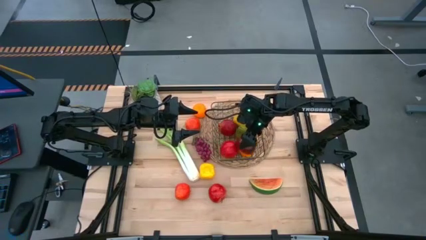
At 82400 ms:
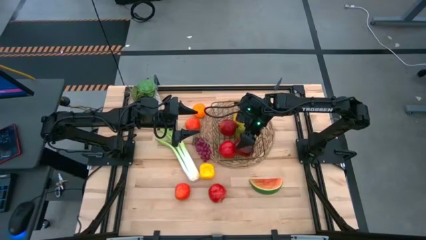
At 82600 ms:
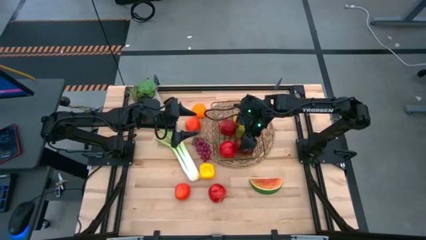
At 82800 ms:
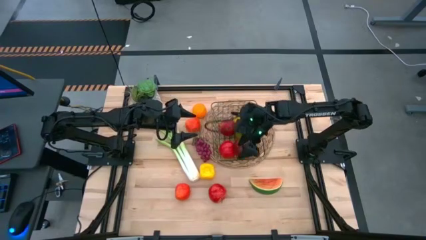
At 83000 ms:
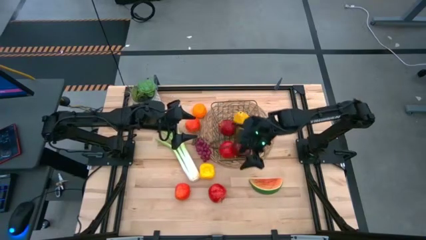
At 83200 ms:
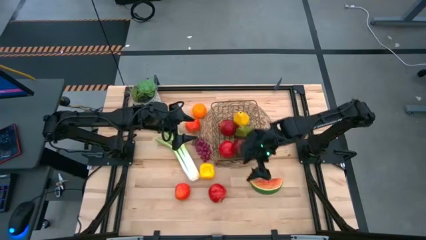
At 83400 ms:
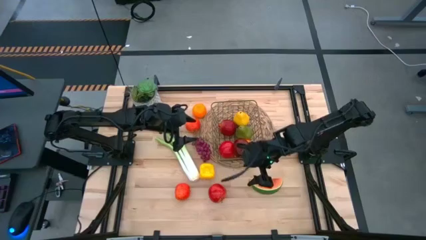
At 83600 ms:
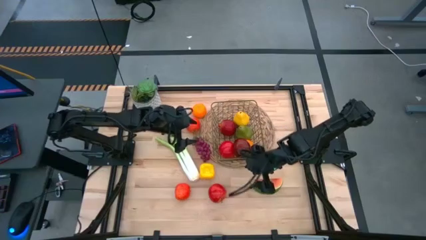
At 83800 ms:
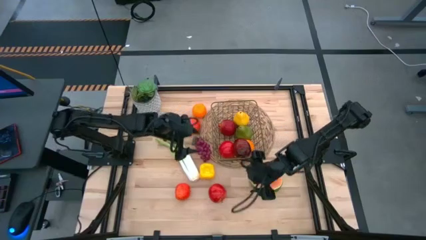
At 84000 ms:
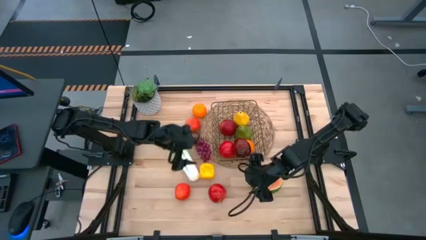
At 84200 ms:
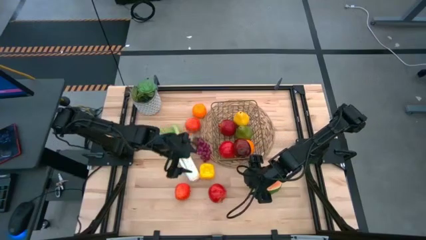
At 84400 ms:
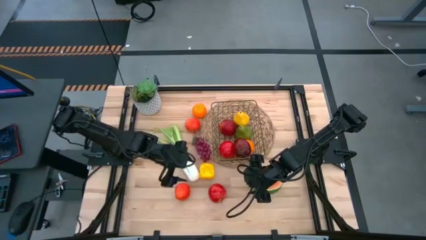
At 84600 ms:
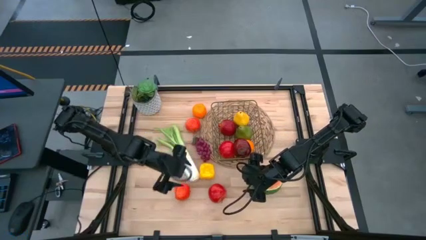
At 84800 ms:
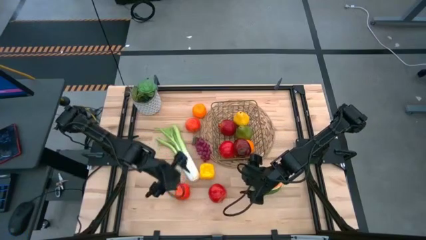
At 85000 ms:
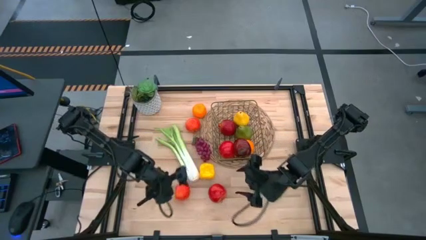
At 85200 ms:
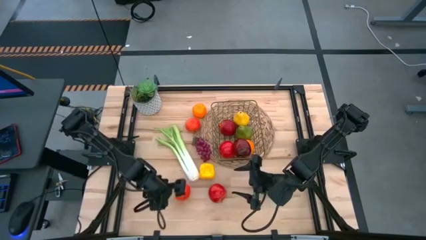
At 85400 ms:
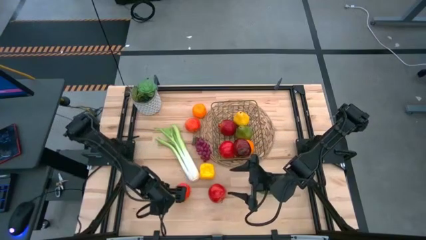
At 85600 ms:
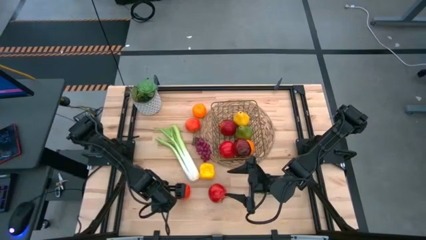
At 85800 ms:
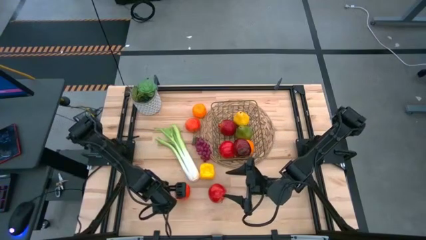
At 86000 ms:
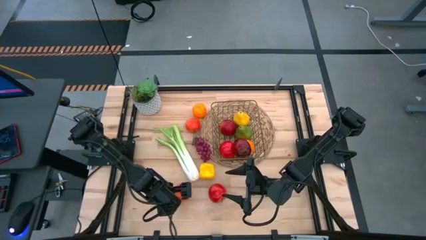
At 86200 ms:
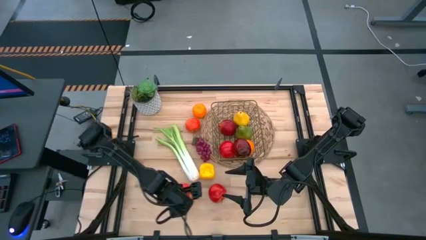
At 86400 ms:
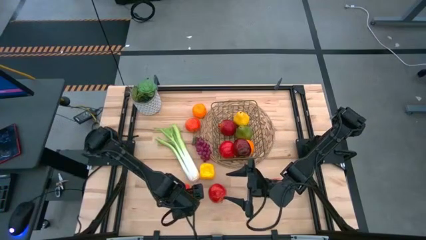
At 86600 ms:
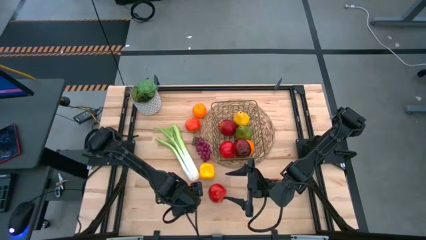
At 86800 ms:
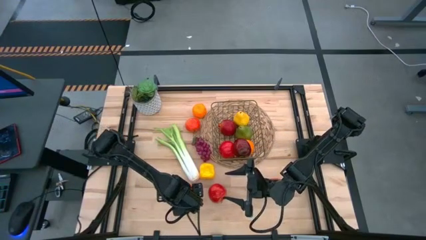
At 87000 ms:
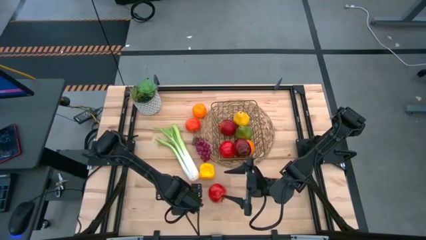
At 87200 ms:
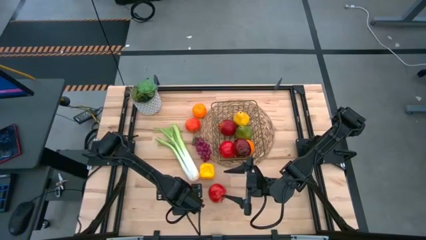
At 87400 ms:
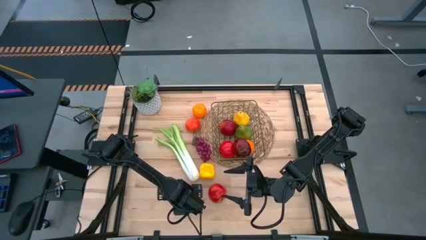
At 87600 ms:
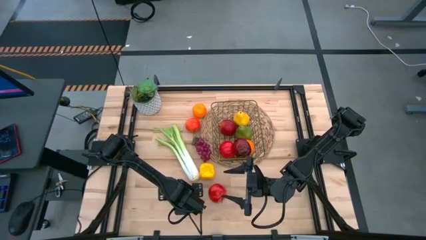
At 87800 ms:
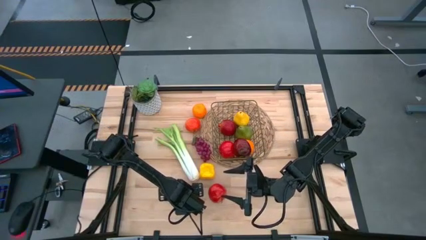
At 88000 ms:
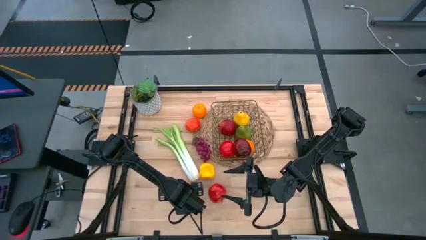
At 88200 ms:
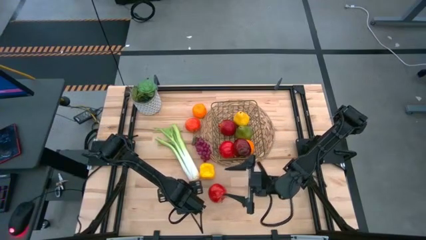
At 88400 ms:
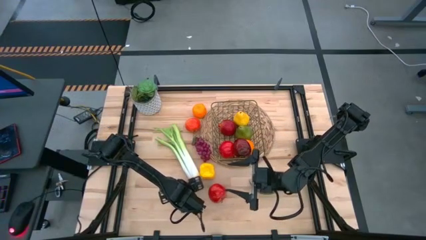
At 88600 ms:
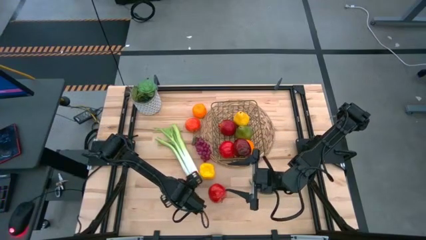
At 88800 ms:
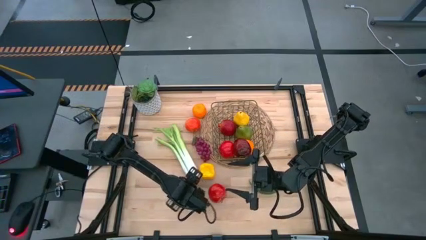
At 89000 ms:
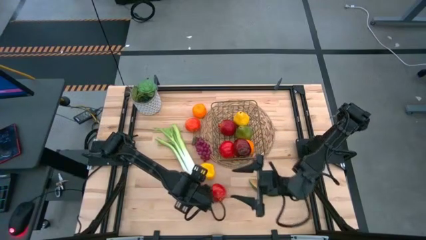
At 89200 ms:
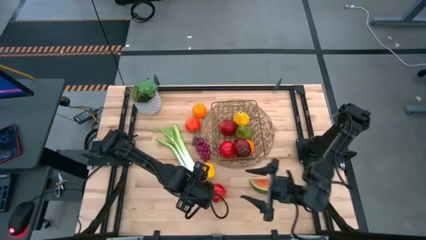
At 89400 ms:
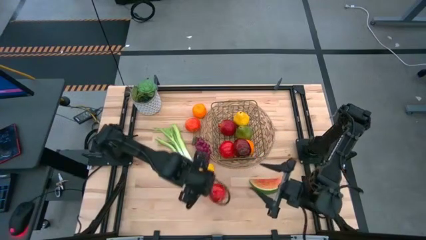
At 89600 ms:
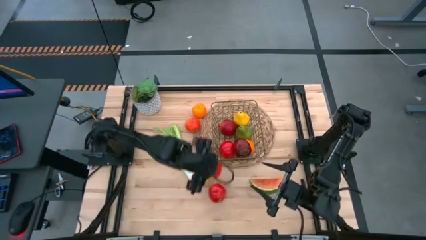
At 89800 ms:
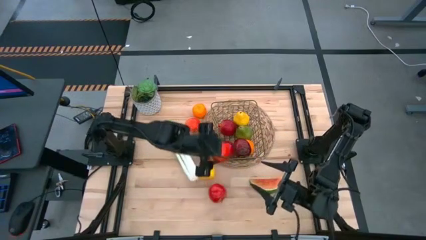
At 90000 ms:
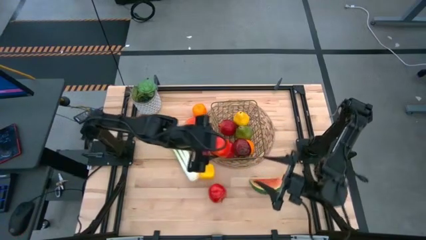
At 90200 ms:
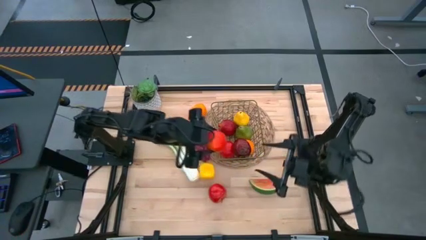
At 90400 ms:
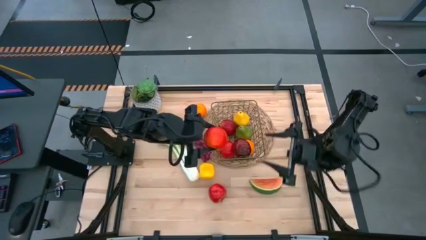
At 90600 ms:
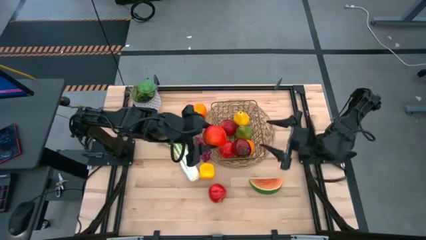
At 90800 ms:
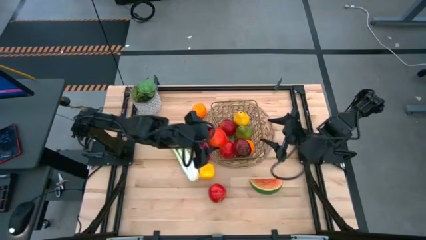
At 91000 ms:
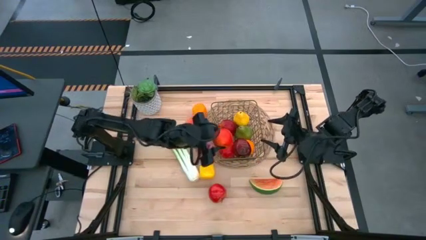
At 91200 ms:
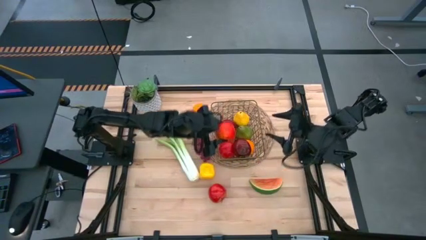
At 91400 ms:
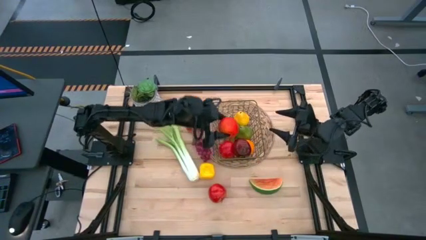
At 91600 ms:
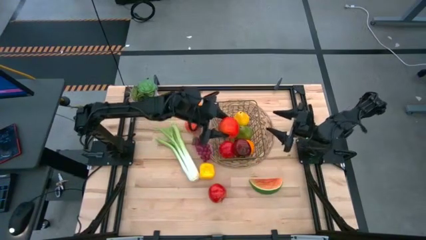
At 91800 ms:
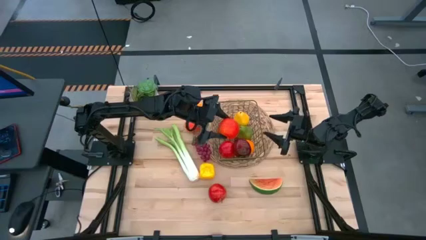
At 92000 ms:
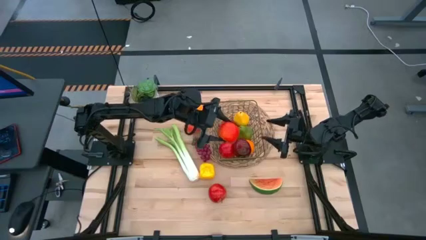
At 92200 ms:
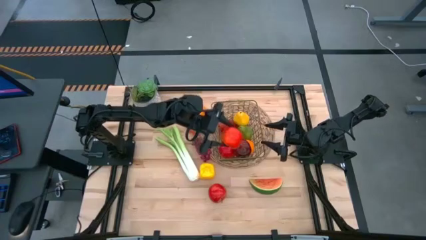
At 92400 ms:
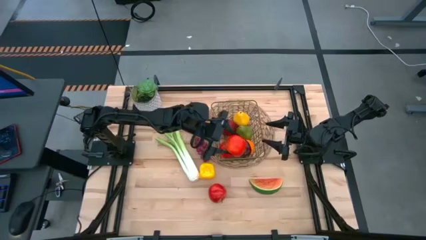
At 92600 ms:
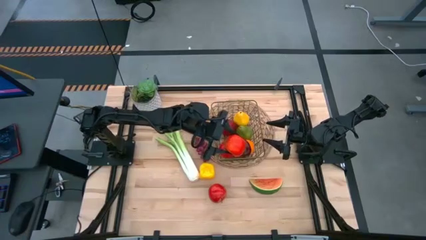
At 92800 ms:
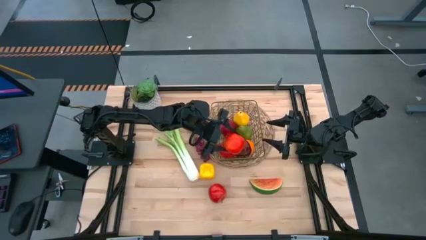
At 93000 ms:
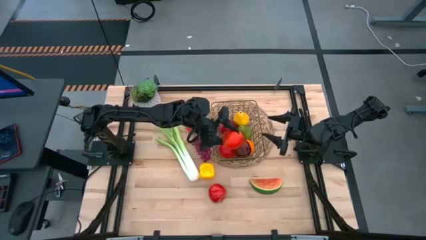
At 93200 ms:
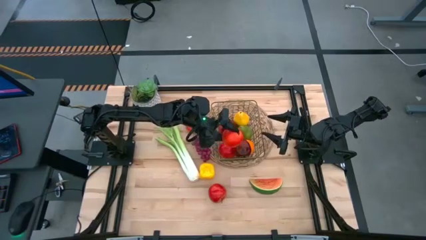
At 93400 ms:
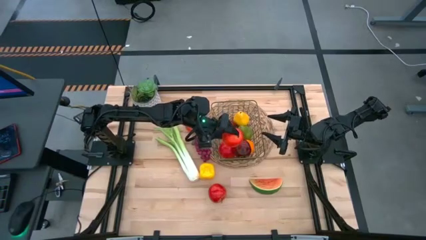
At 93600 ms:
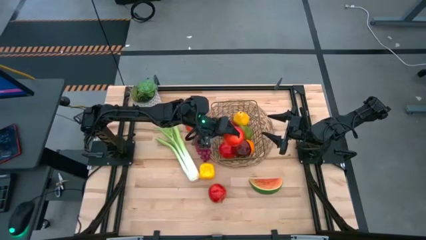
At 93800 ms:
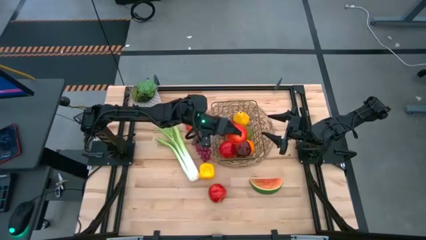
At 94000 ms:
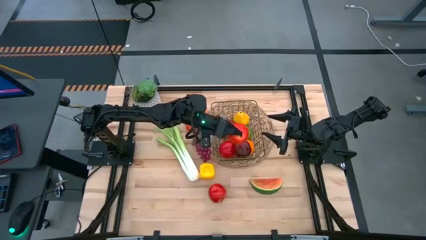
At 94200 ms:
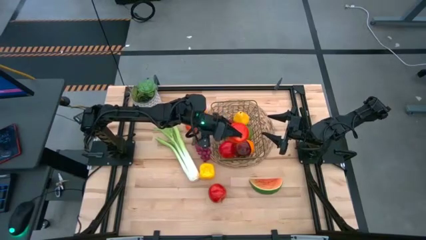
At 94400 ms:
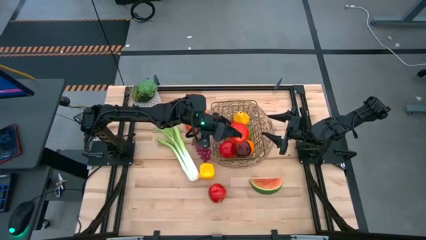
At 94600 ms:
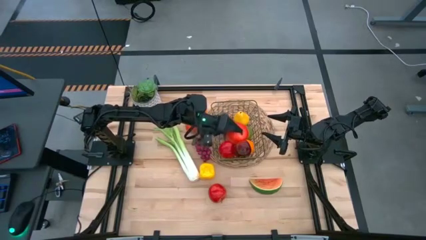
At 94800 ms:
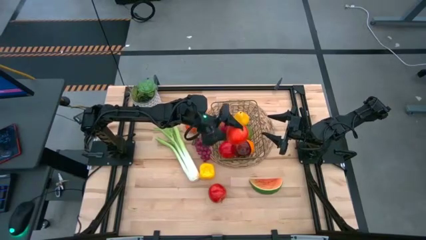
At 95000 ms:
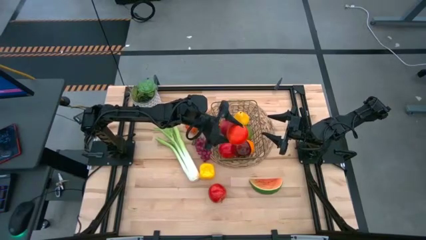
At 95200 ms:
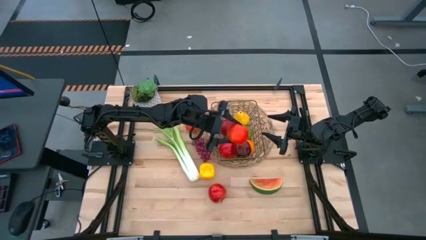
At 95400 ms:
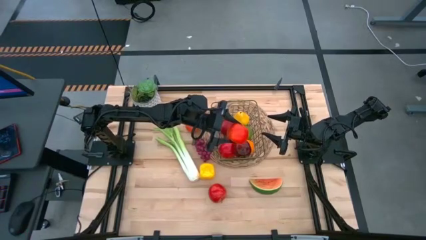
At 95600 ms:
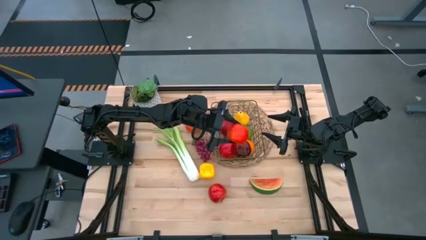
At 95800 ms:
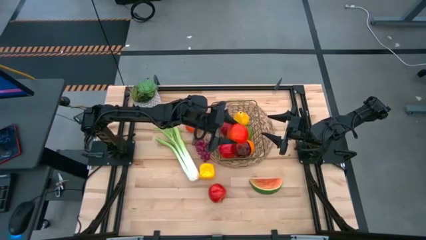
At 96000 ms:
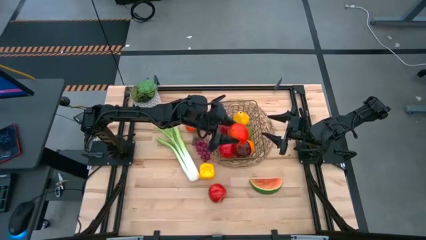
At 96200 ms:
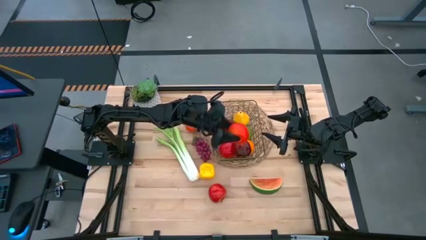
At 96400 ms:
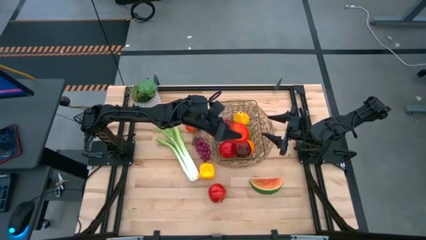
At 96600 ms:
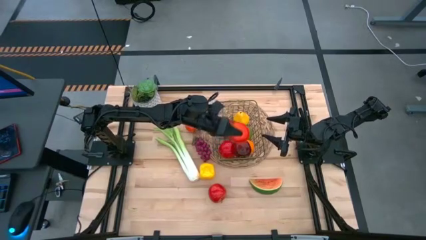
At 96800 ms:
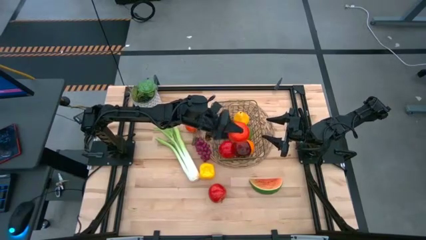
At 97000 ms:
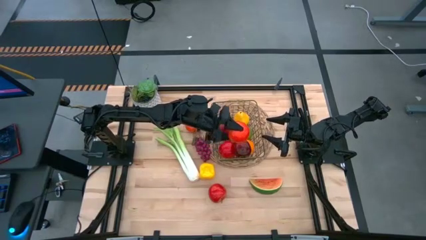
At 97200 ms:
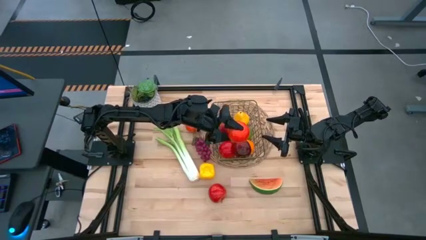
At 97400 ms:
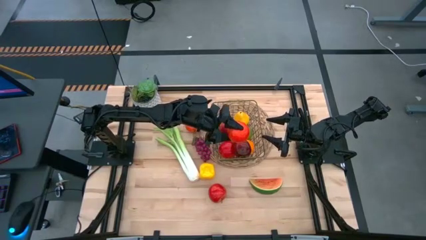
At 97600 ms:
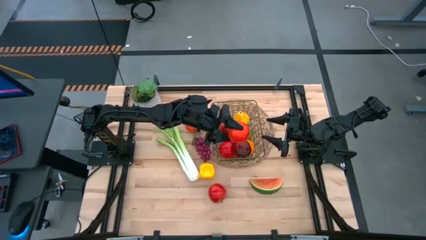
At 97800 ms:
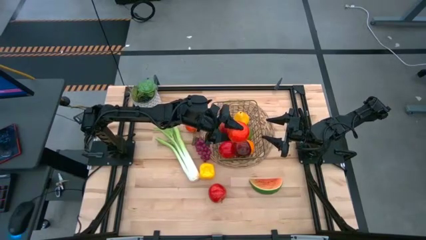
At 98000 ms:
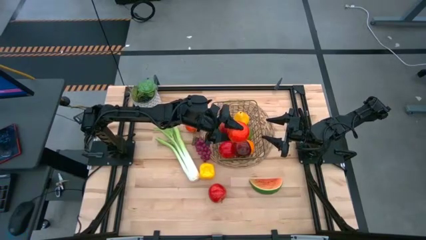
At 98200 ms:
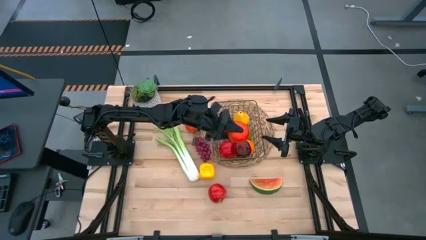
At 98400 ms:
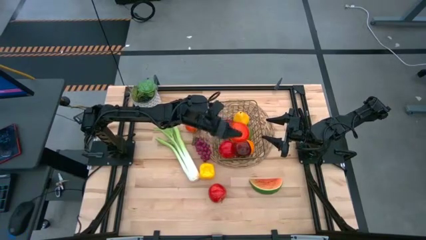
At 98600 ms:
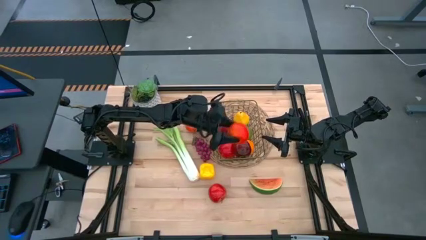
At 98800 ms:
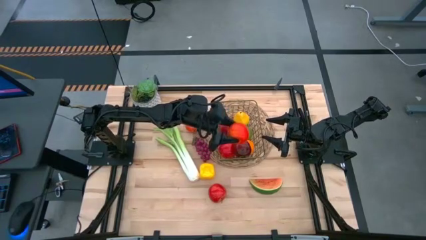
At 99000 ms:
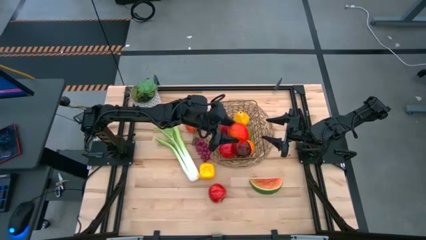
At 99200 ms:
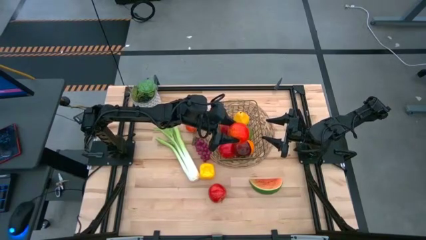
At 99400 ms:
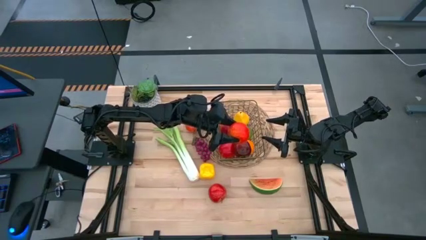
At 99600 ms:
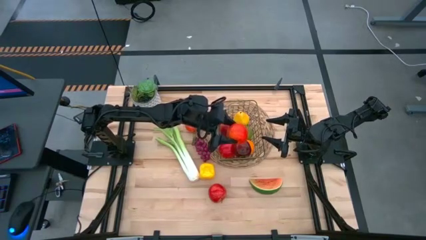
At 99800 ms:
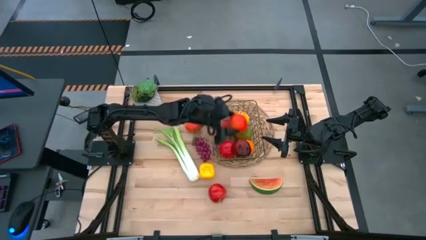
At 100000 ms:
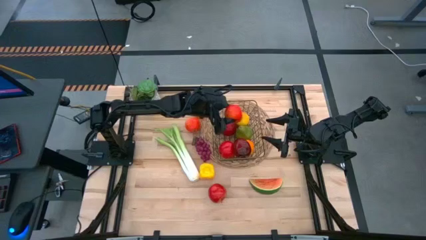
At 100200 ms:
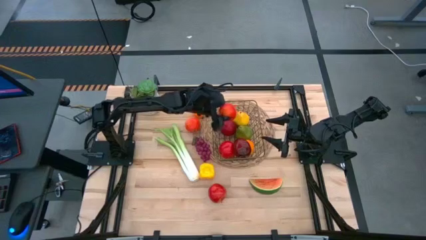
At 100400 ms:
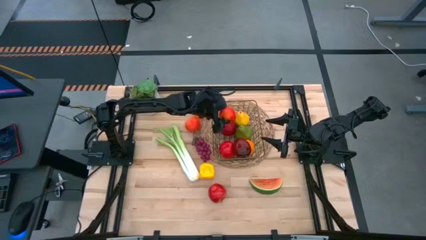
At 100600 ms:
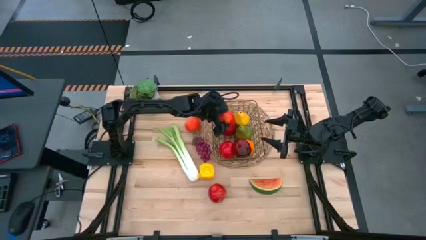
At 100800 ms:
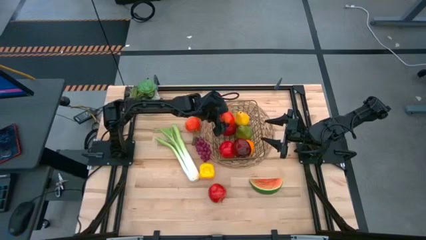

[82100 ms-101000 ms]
Task: Build produce basket
Put the apple into the wire basket
